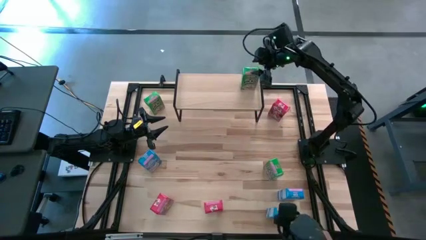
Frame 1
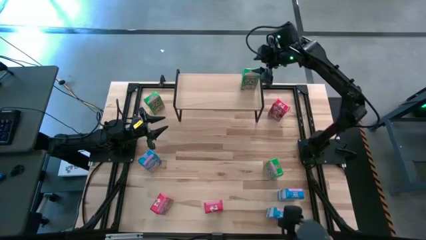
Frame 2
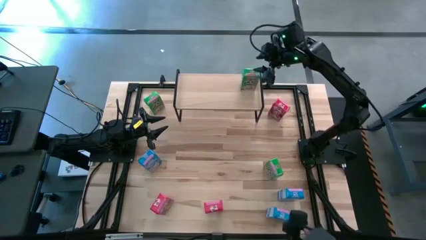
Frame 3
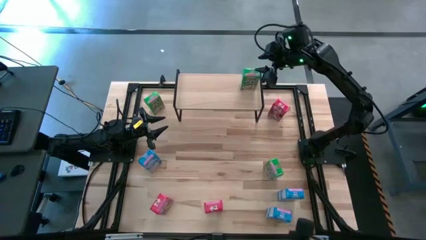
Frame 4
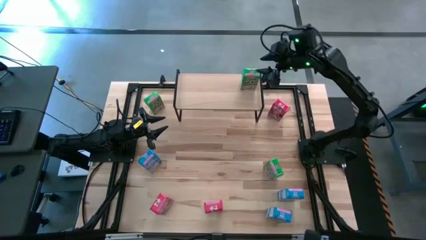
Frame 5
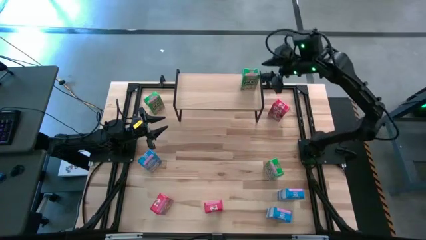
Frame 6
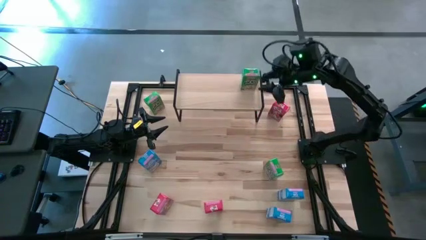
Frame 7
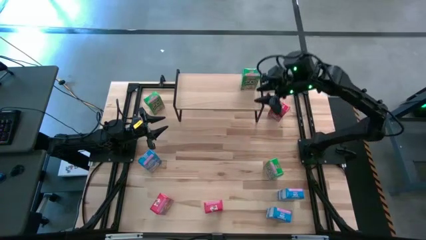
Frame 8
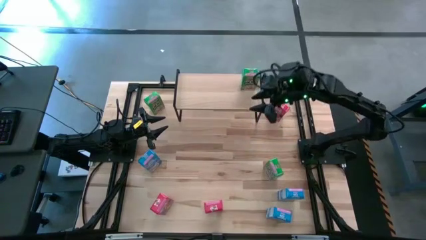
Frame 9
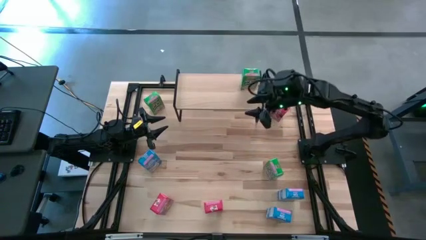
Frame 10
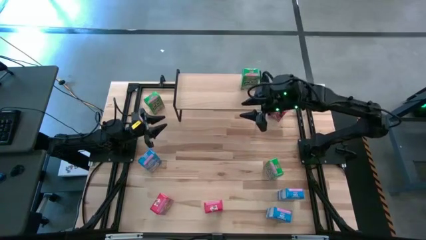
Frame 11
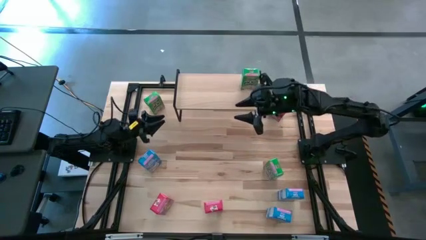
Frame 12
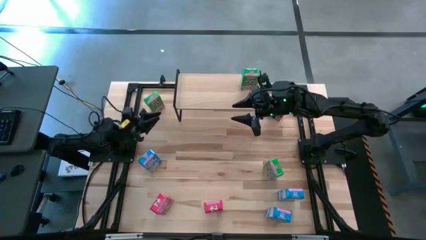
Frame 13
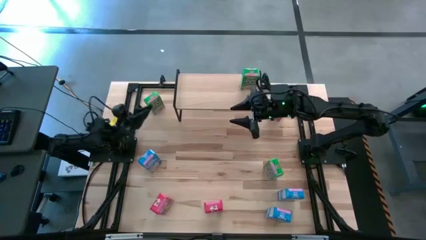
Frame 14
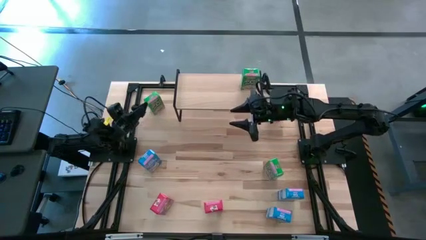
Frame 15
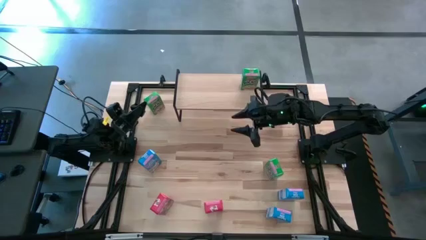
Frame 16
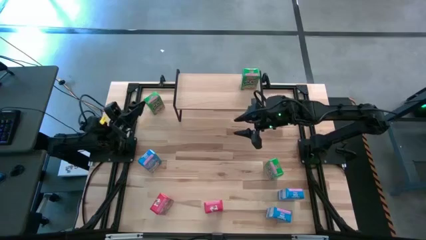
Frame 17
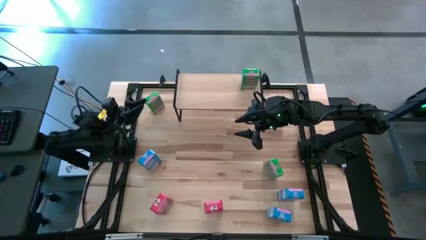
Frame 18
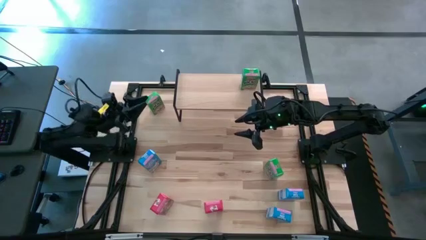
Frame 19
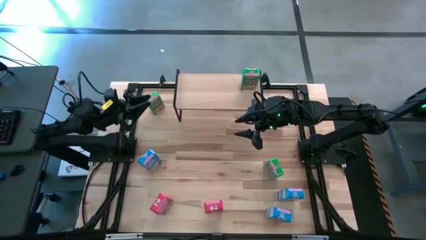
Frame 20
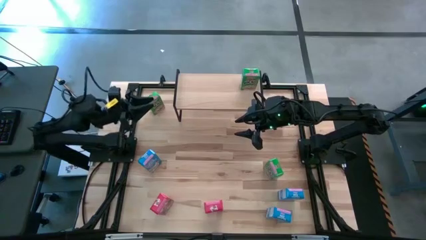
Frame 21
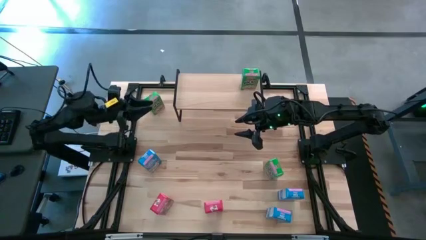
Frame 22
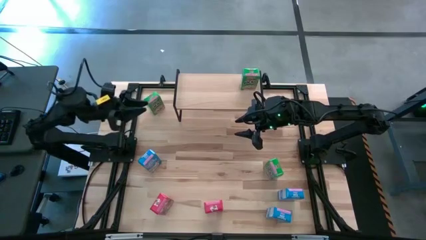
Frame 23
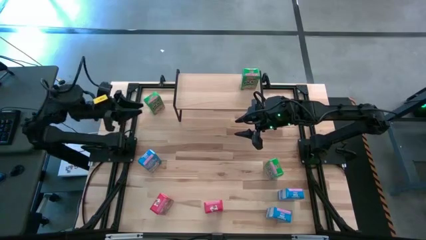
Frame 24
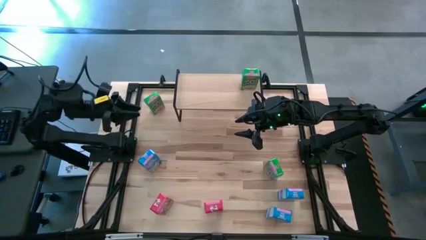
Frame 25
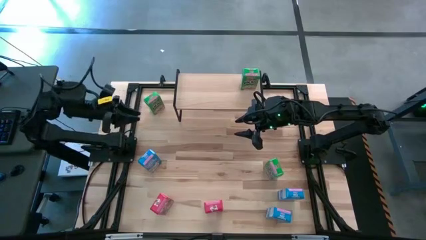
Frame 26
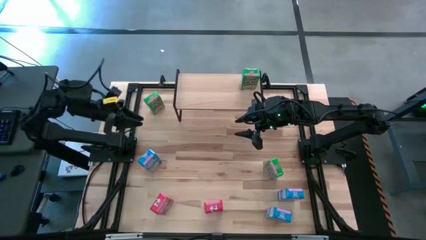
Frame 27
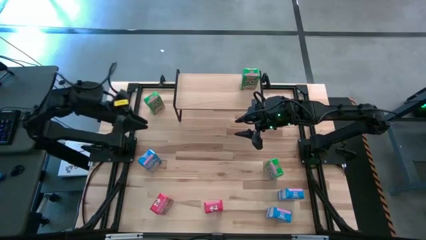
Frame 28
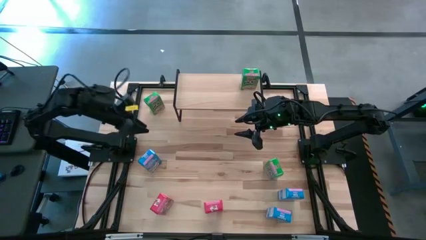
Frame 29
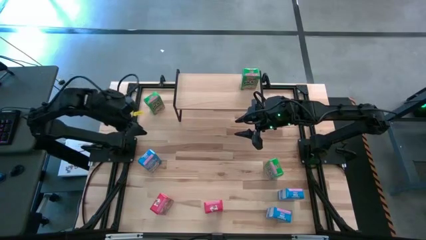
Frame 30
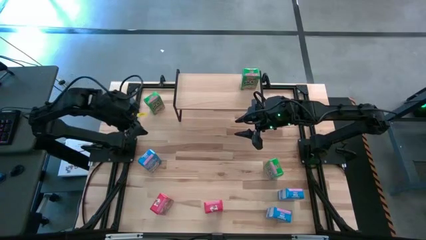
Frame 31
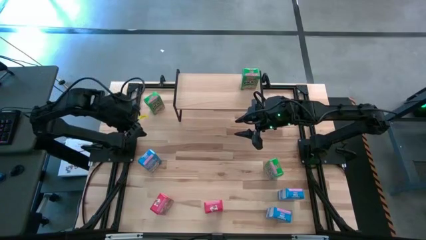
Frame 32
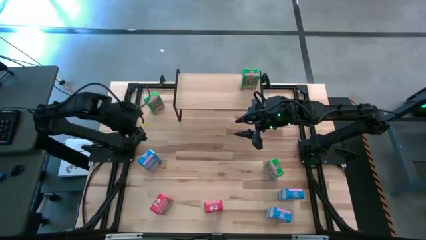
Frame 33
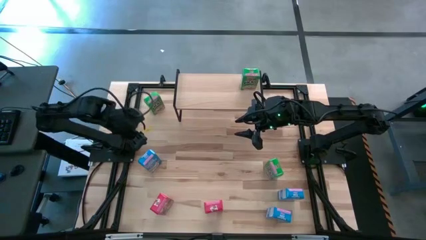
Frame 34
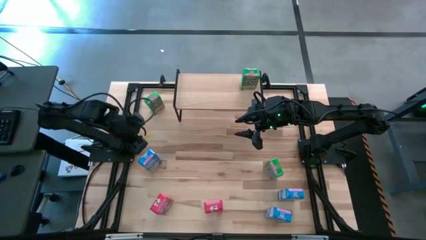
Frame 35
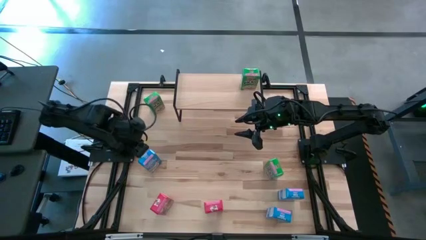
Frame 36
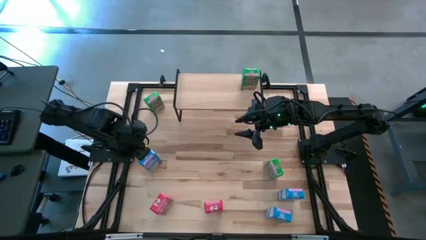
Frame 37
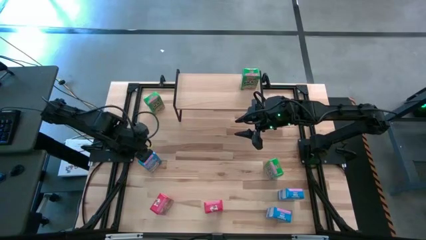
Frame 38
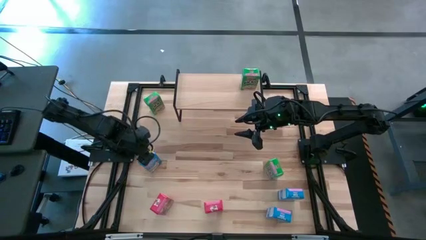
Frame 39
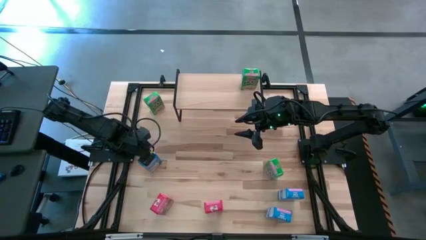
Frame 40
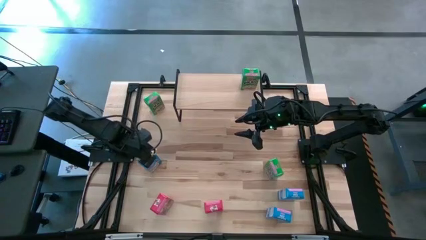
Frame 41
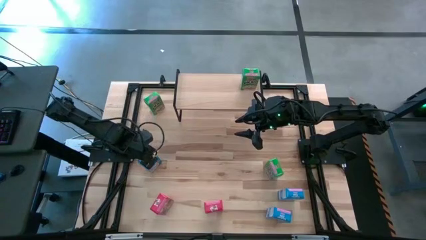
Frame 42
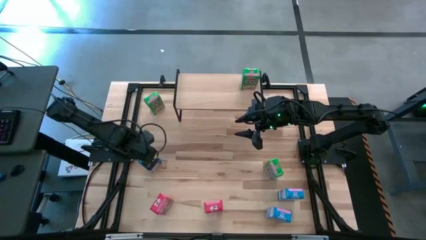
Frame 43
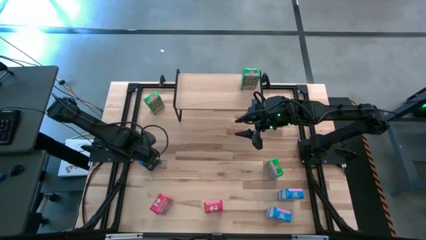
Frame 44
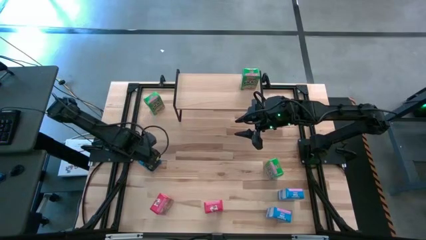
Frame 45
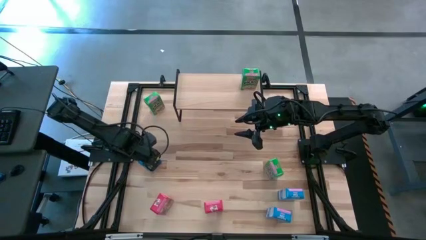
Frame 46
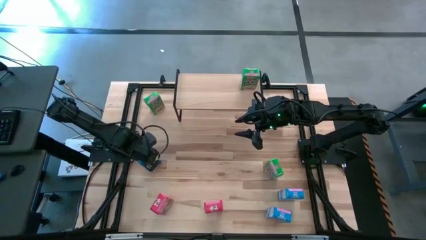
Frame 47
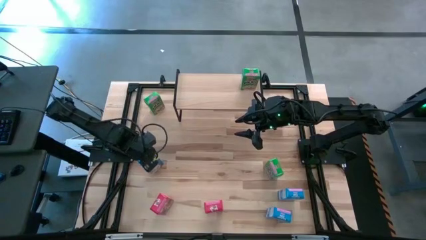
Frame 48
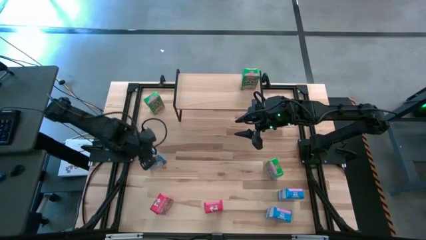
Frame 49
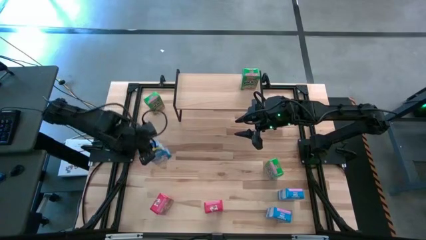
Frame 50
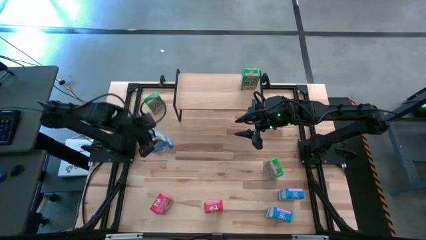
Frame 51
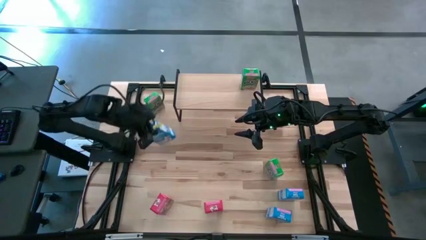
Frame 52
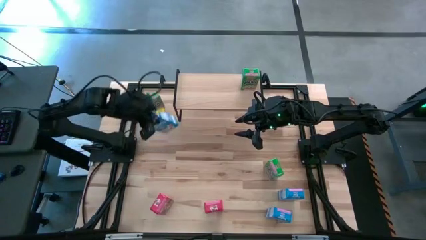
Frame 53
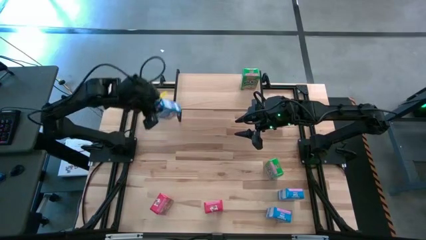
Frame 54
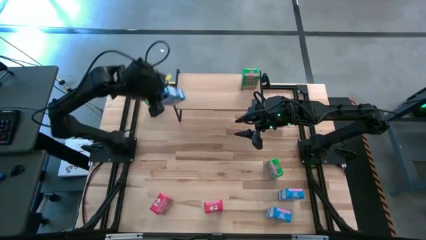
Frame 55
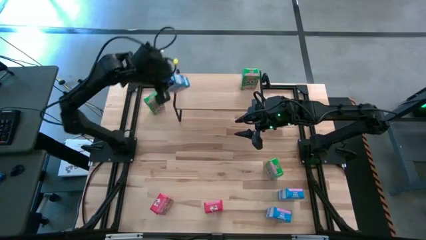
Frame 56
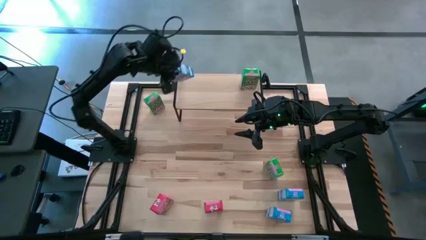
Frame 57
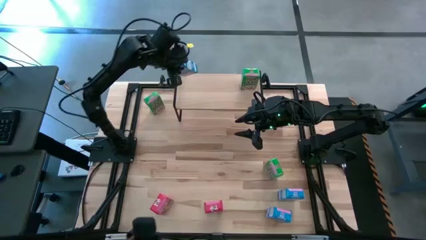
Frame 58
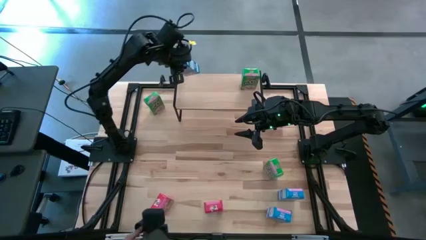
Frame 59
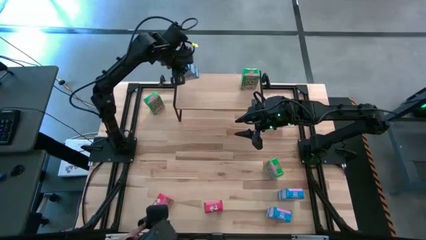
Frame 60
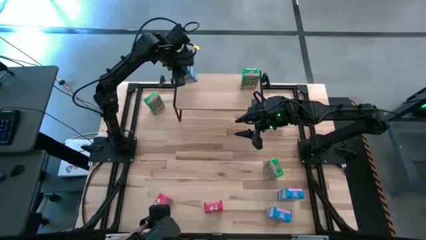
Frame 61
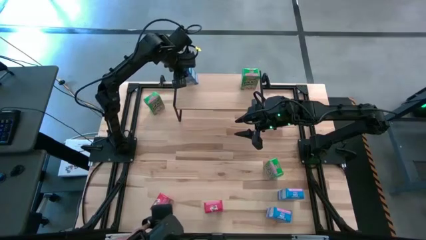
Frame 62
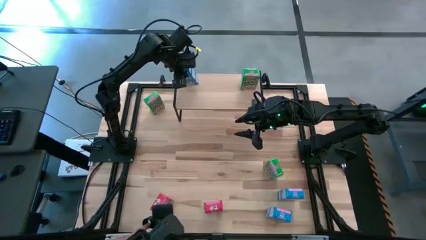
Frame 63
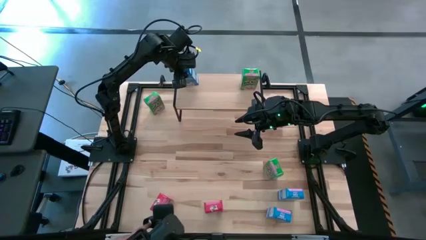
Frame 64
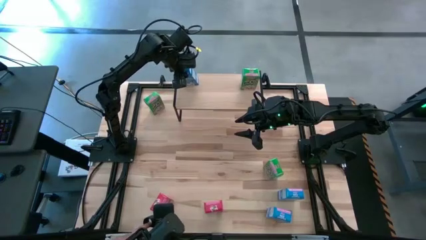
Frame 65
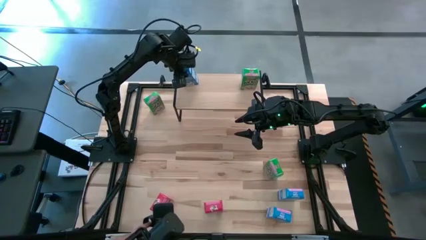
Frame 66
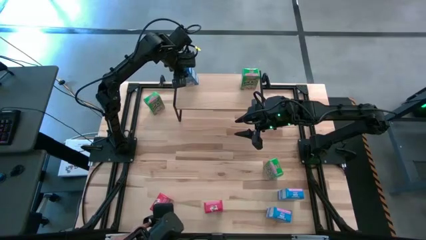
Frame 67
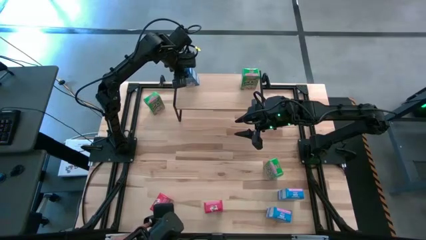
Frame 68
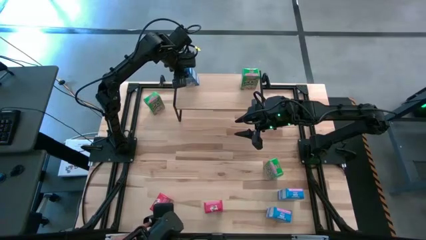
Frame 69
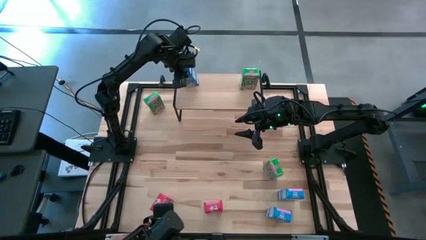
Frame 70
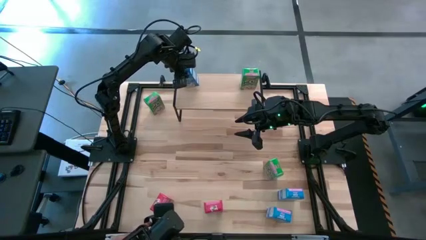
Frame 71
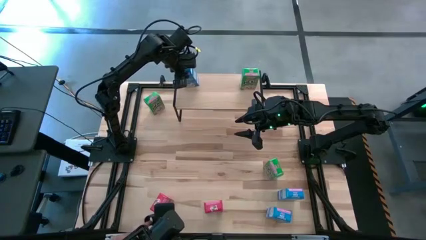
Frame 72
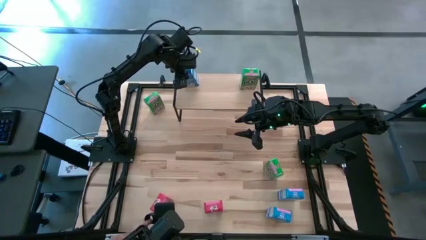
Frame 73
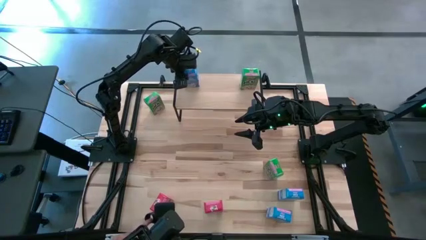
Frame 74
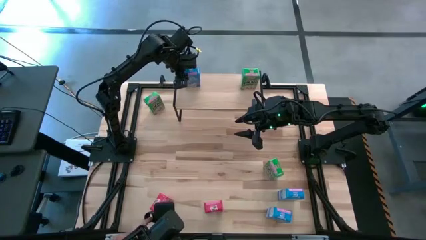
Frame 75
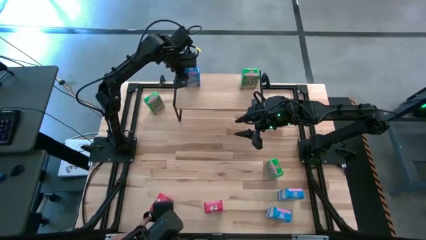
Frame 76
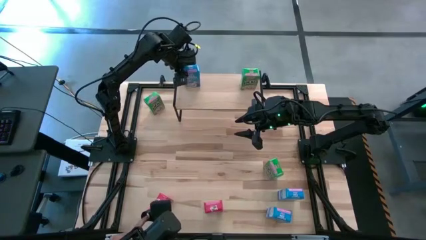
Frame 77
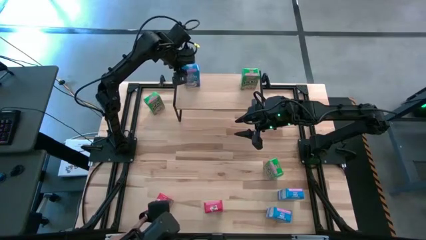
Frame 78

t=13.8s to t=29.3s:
Task: Stack cereal on shelf
Put the top blue cereal box on the shelf

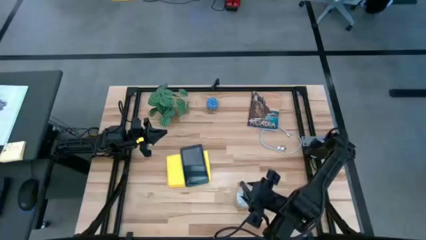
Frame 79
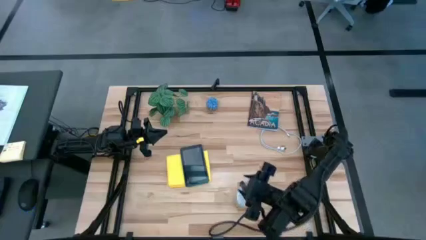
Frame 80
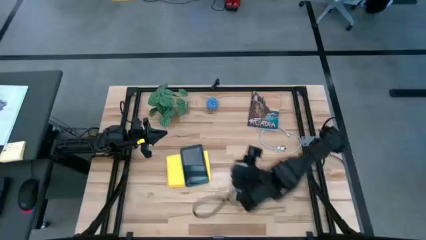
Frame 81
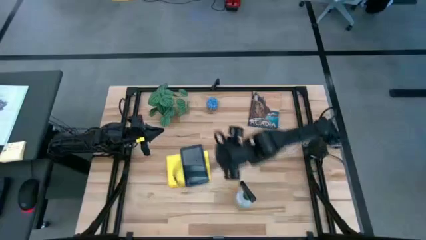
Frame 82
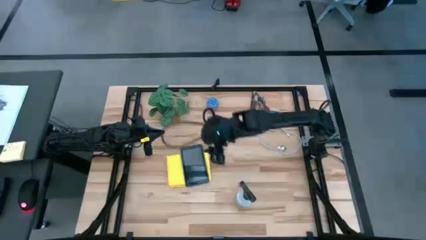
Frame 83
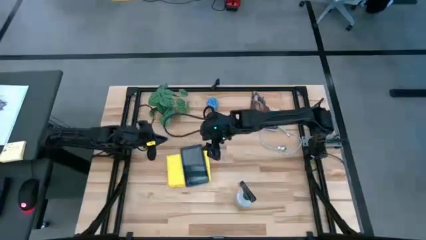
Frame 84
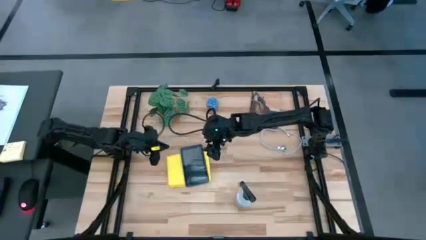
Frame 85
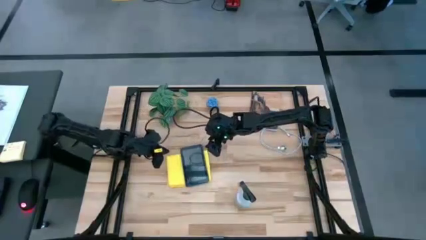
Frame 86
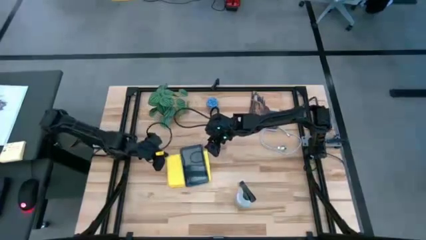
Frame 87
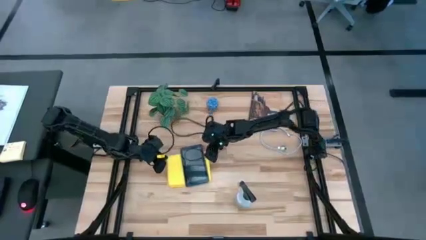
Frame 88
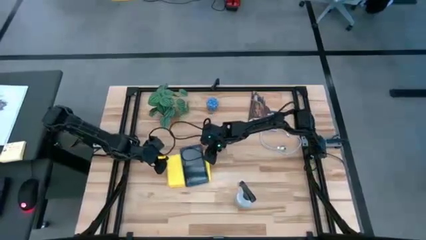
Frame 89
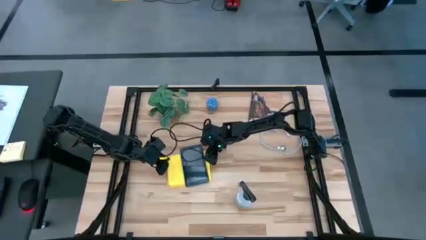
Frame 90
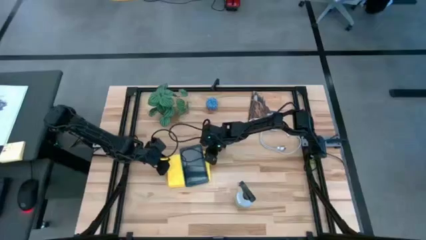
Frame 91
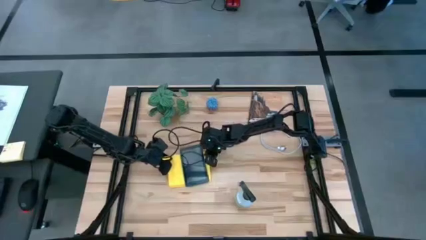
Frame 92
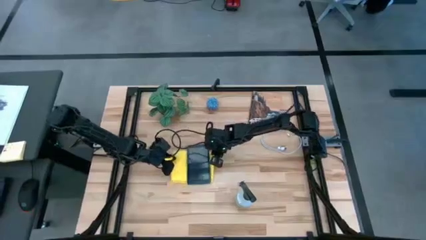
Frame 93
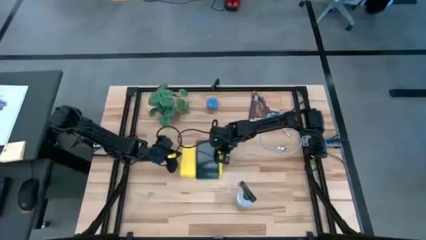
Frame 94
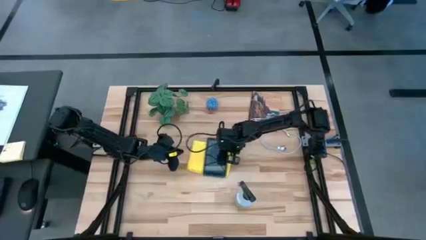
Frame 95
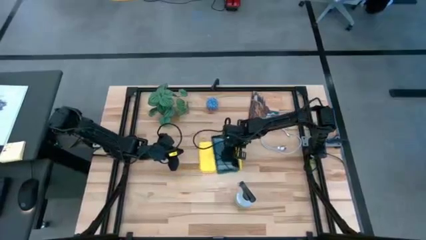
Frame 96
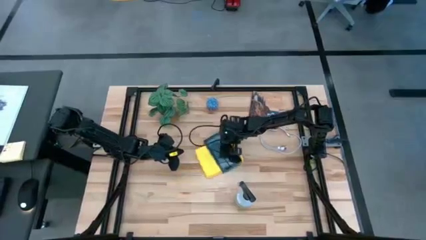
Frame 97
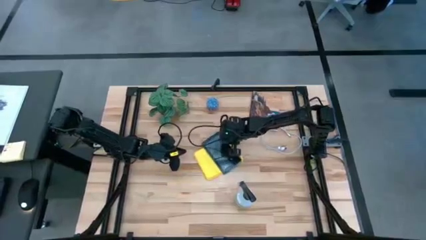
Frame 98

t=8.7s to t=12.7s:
Task: Apply microfiber cloth
Move the yellow microfiber cloth to the center
